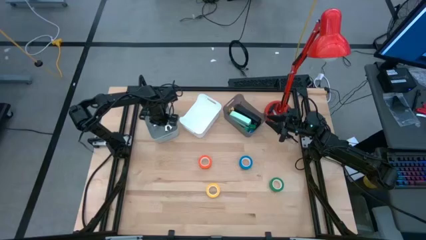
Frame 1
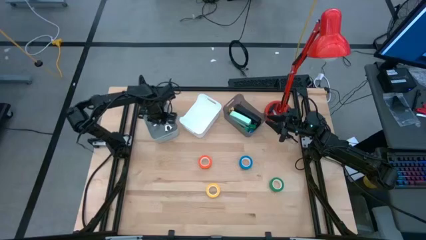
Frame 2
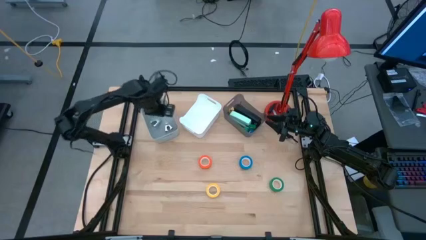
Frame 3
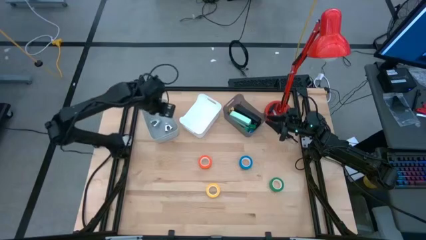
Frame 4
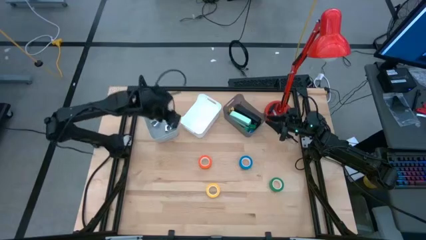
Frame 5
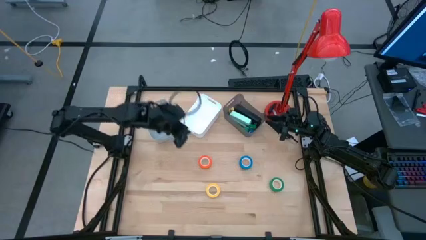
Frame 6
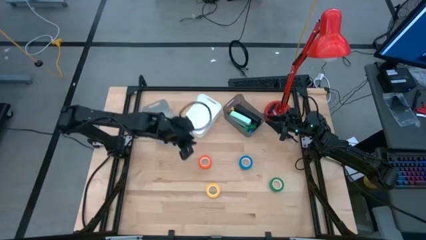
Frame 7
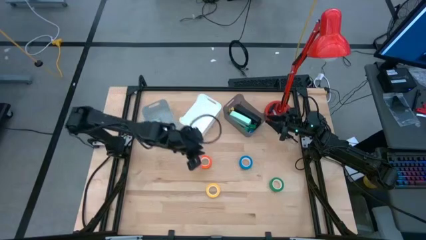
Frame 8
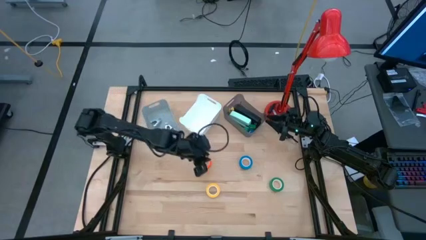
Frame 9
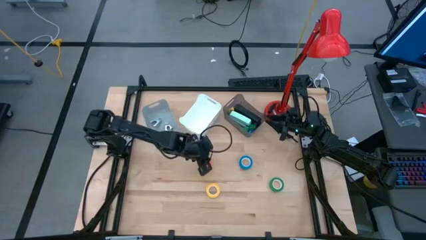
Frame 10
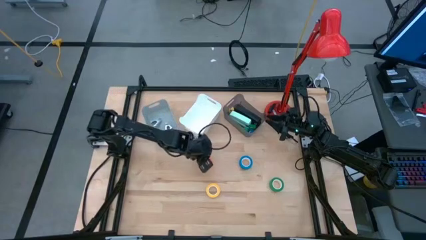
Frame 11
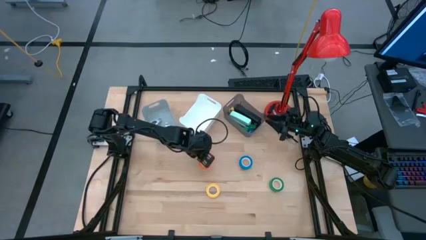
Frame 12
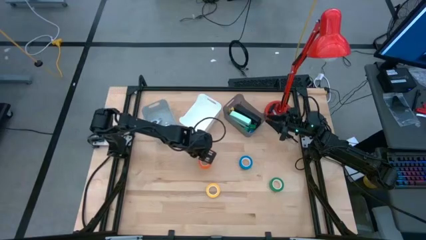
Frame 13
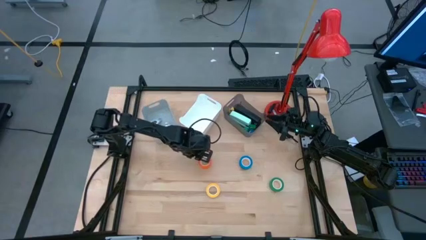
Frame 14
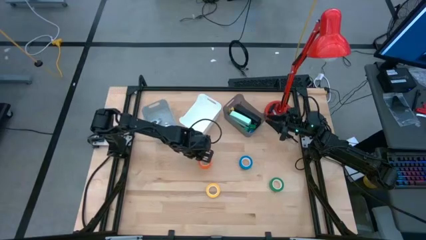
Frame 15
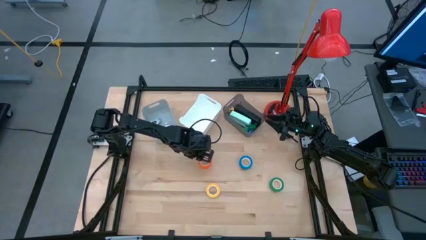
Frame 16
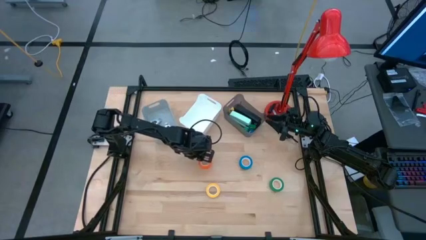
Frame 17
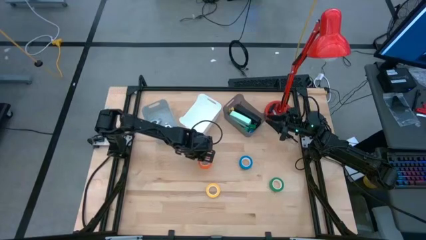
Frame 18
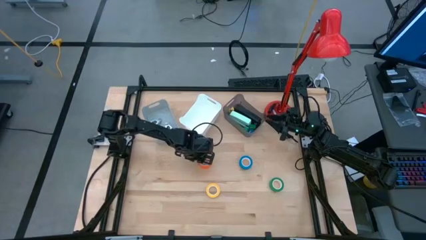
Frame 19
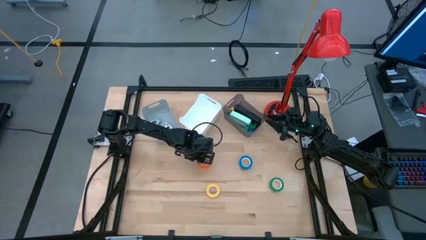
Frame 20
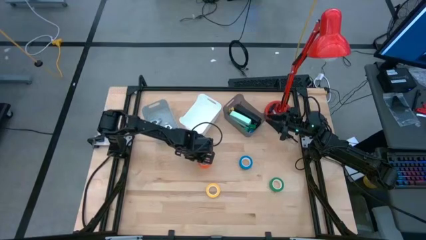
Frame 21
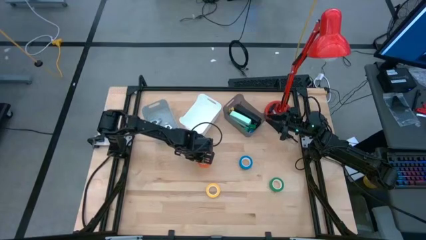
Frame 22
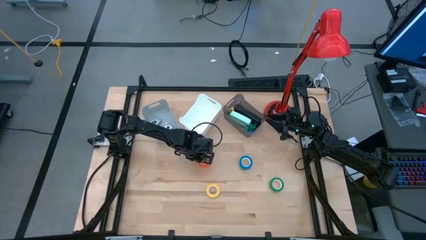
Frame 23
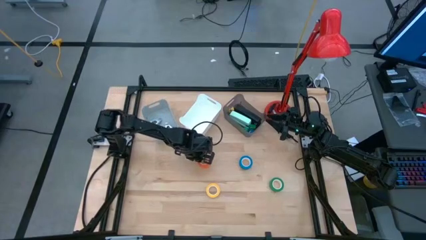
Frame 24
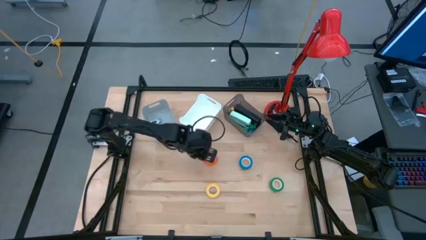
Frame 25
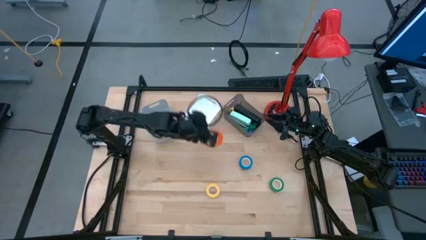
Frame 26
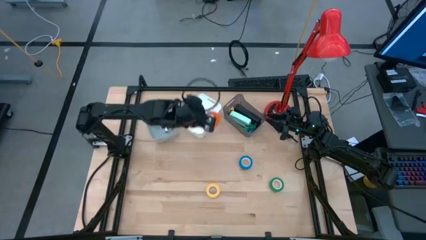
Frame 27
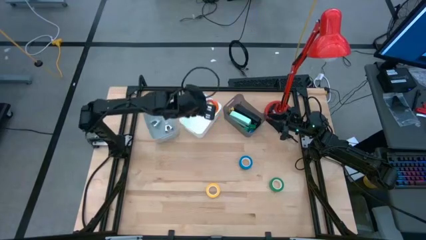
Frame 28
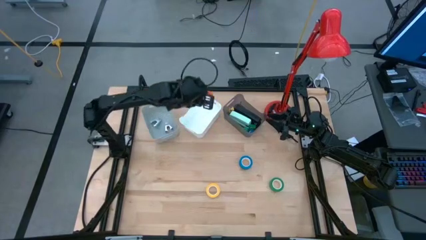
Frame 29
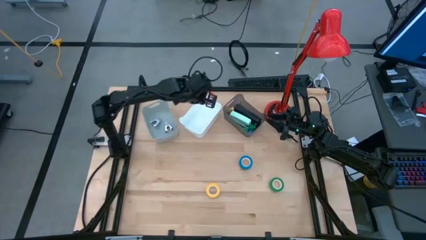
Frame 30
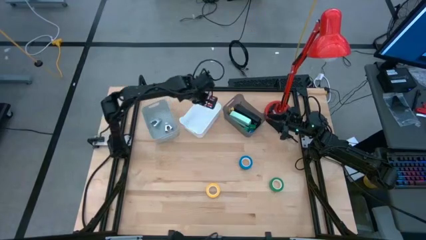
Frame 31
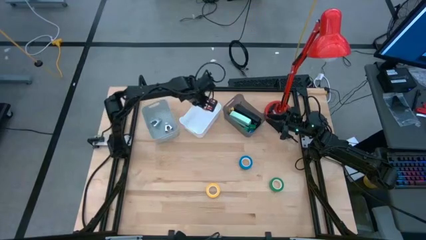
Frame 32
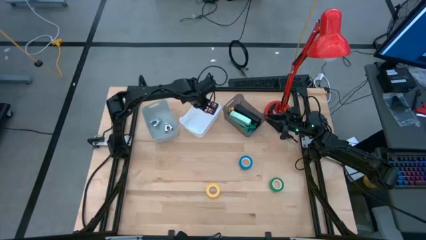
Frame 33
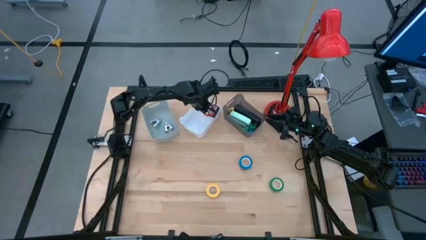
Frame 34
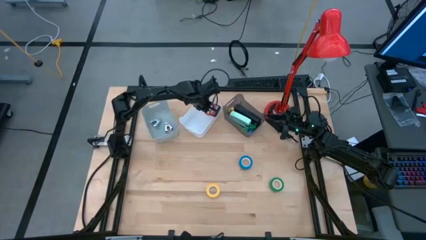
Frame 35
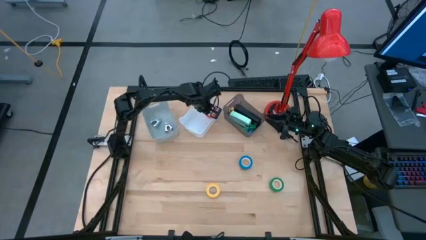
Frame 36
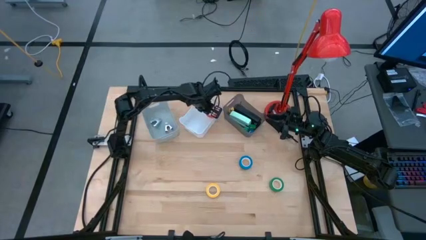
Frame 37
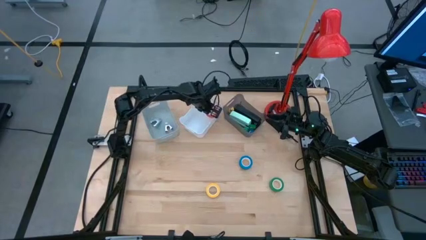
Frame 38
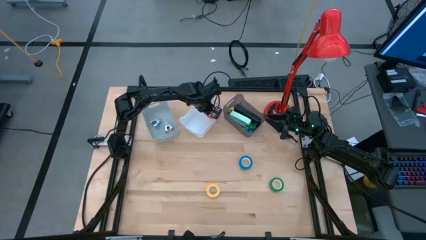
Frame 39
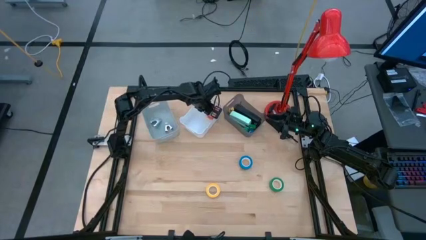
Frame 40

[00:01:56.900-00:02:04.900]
Task: Pick and place Stapler, Stapler remover, tape
Put the orange tape into the white bin

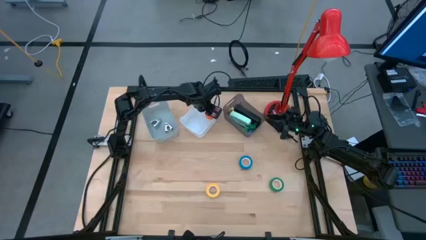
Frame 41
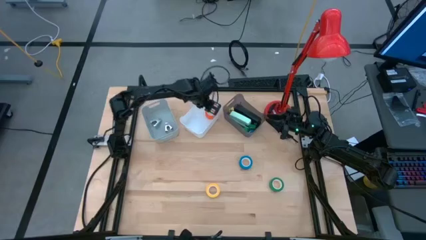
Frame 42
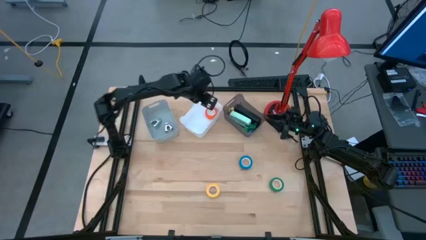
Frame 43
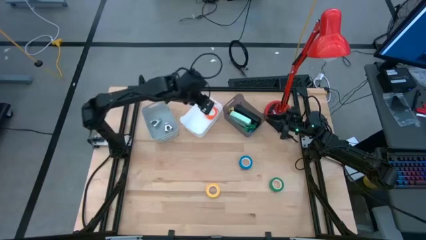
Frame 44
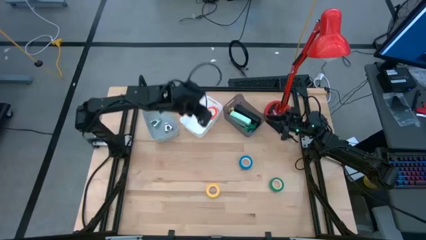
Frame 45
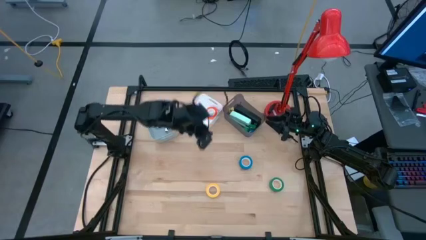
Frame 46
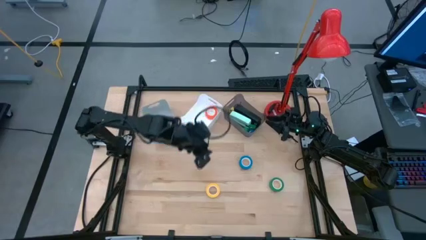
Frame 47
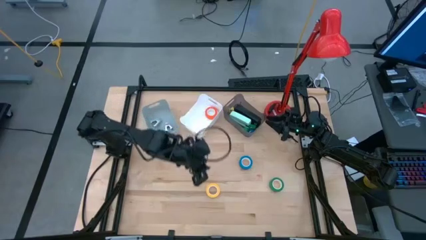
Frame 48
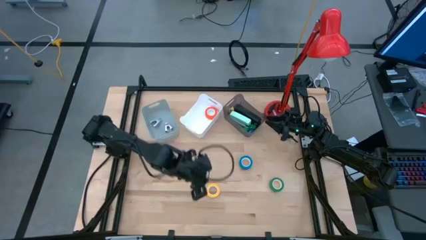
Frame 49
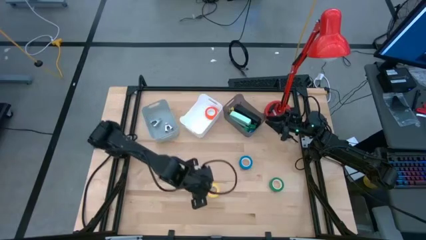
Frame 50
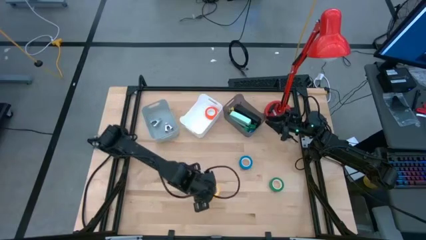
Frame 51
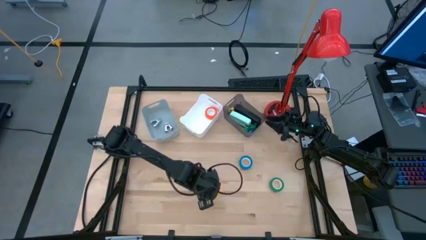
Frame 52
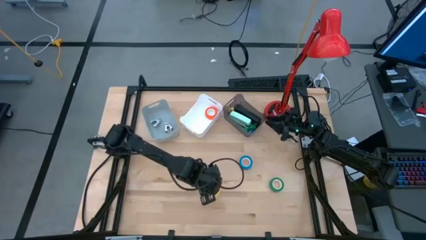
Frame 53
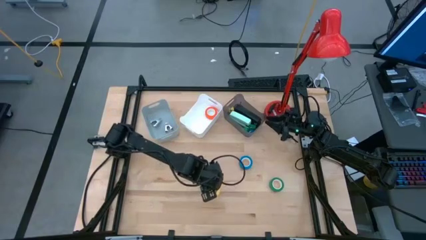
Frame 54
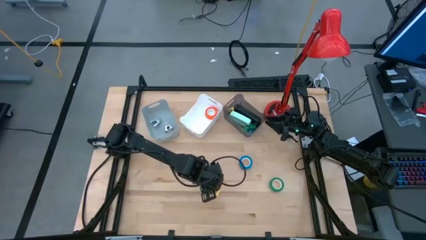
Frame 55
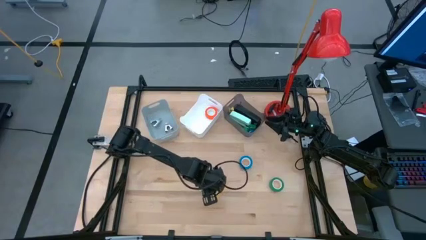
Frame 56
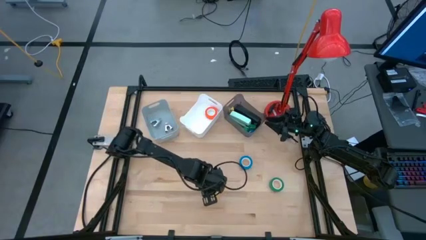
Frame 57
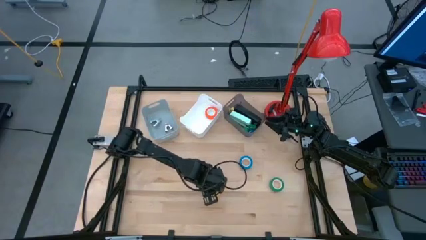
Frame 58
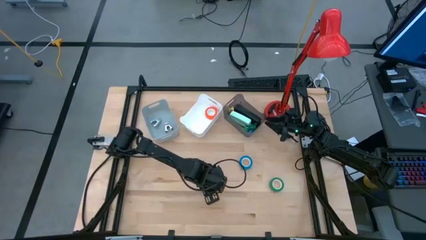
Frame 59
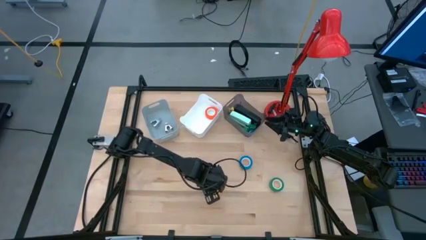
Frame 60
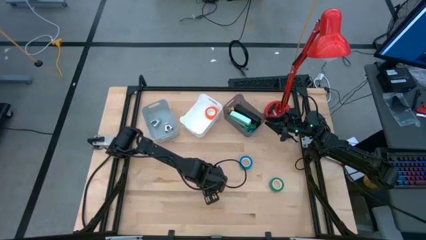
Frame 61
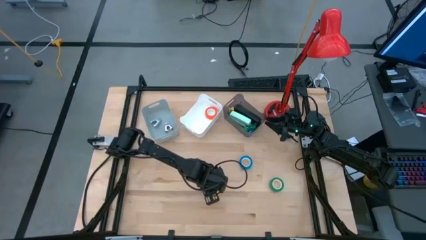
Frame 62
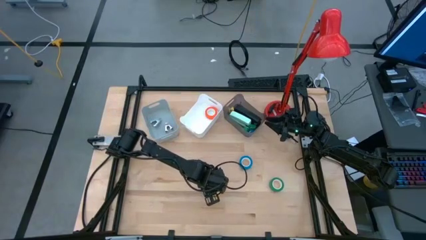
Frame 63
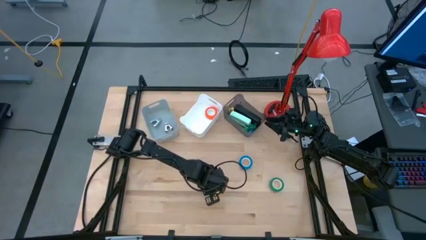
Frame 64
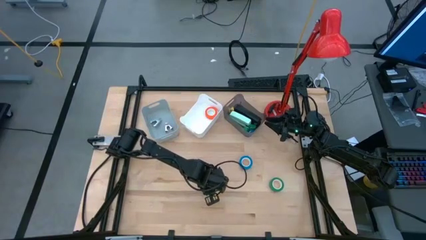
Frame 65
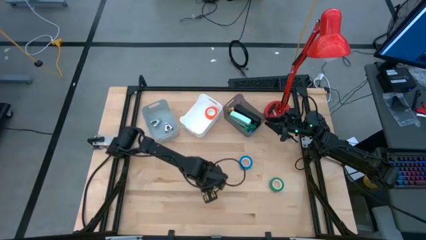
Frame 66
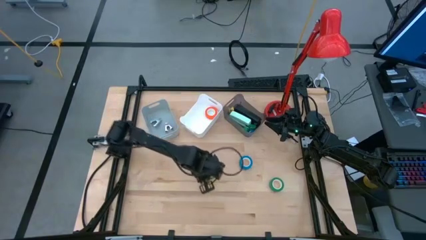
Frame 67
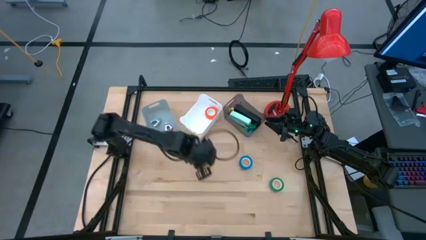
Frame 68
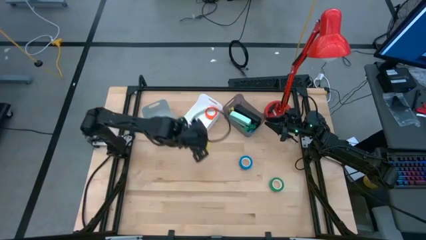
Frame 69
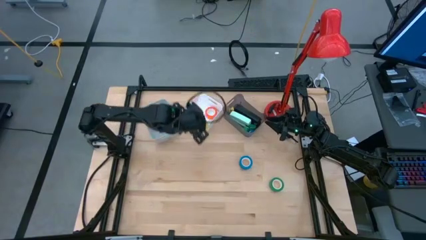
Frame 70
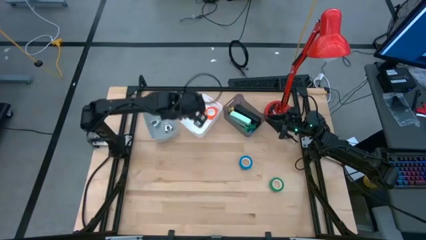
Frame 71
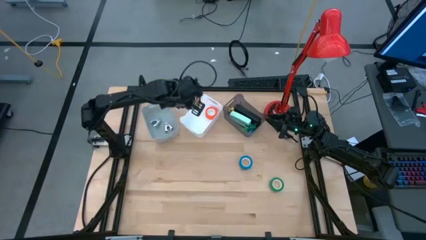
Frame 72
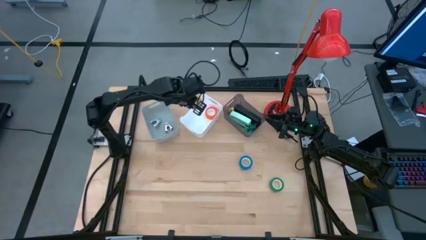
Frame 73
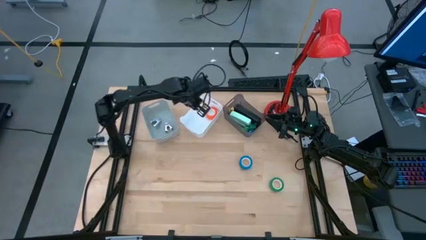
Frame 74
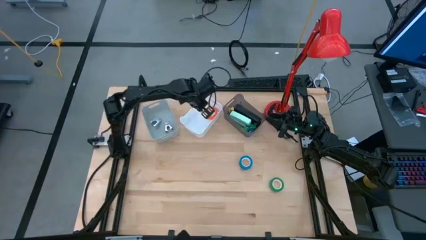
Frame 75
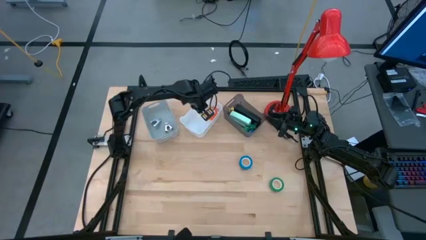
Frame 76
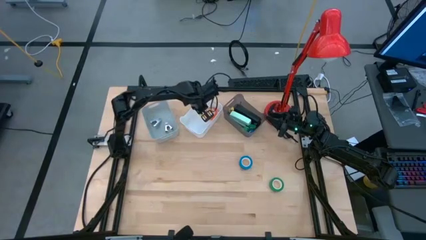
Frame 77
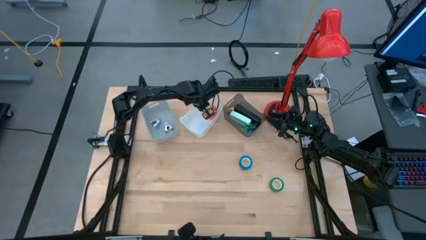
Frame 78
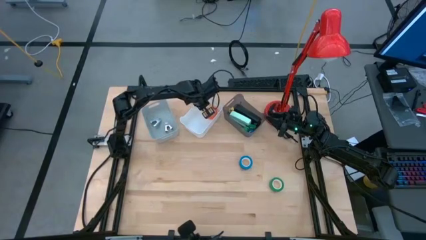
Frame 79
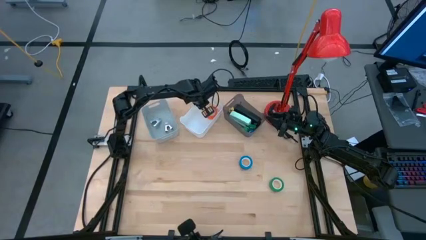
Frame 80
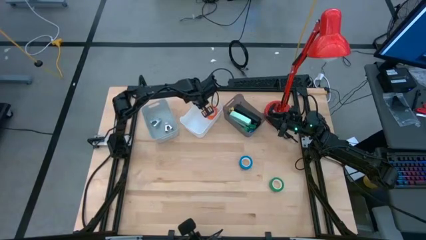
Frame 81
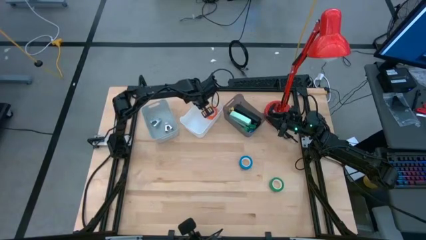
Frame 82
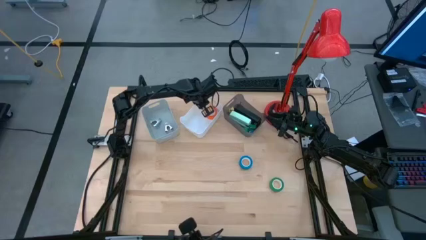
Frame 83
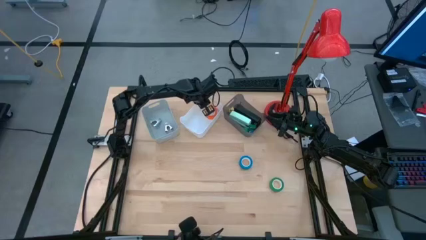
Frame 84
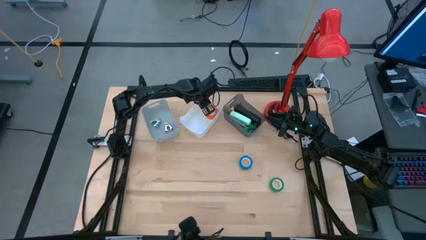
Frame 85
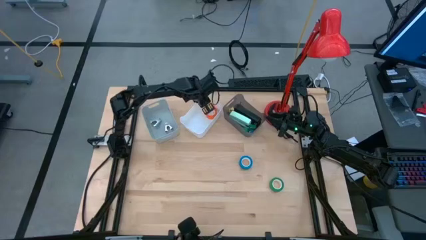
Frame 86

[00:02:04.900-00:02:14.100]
Put the yellow tape into the white bin
